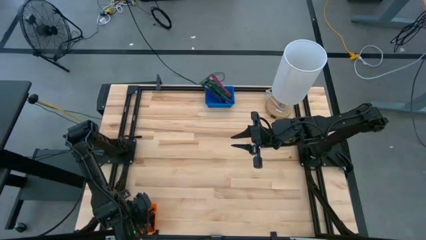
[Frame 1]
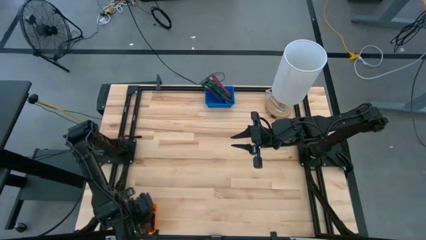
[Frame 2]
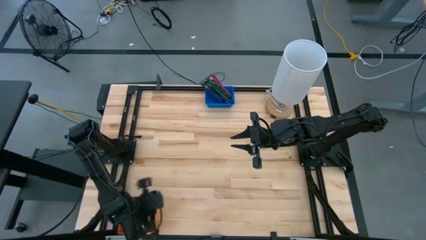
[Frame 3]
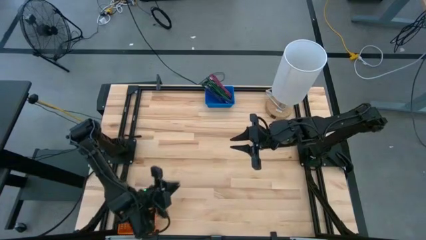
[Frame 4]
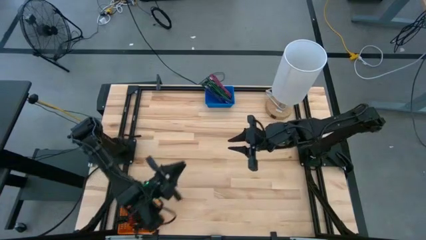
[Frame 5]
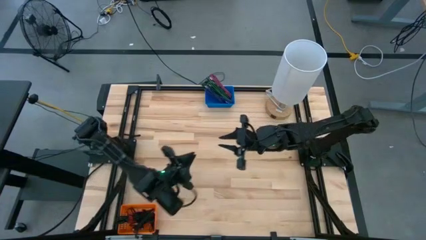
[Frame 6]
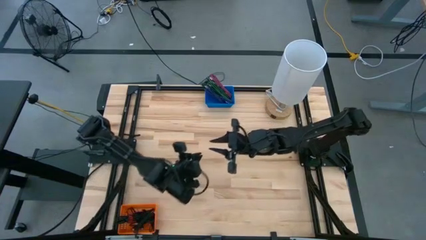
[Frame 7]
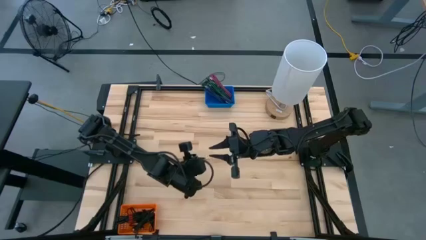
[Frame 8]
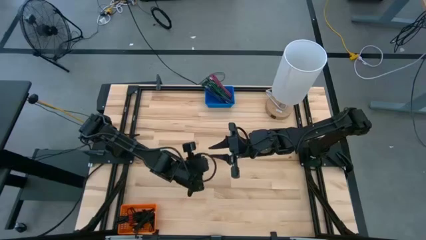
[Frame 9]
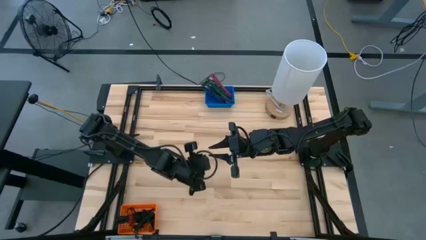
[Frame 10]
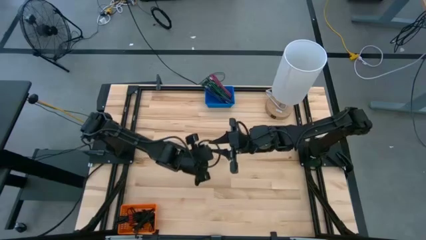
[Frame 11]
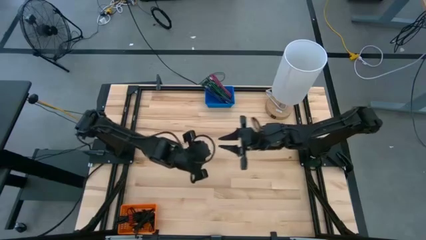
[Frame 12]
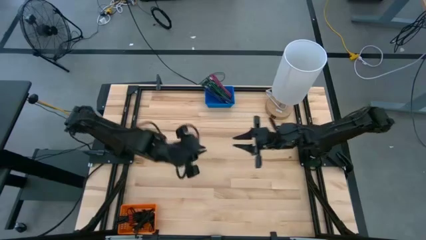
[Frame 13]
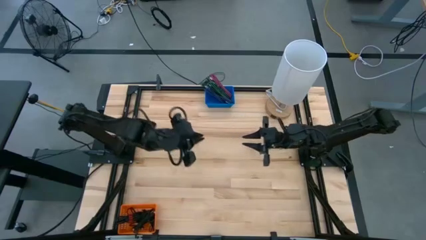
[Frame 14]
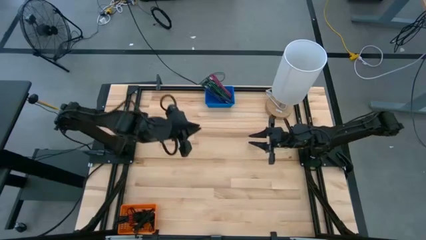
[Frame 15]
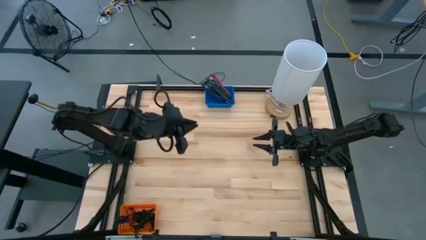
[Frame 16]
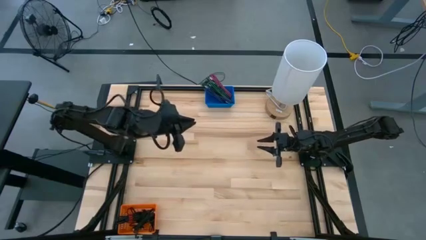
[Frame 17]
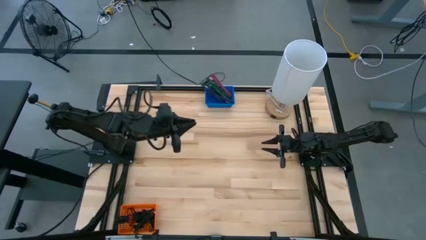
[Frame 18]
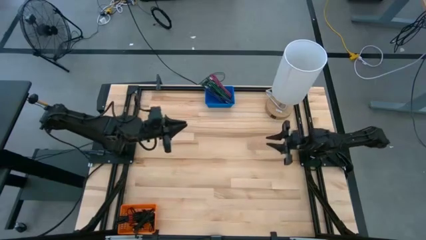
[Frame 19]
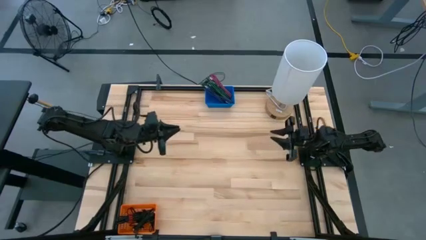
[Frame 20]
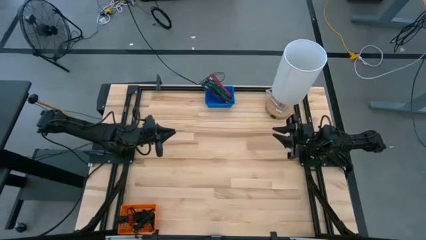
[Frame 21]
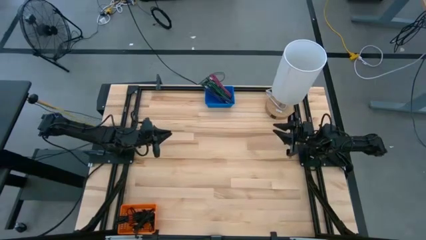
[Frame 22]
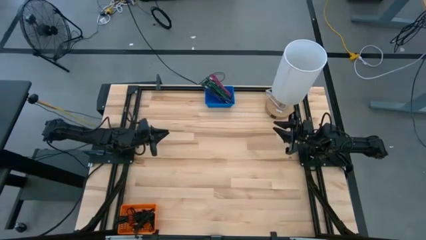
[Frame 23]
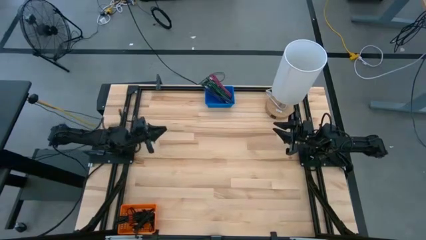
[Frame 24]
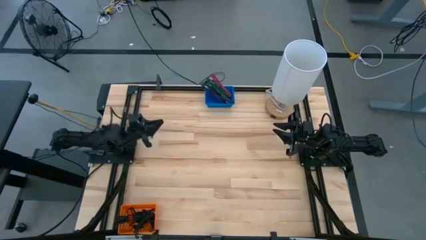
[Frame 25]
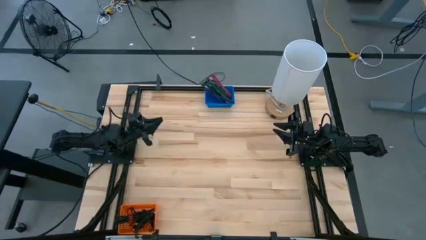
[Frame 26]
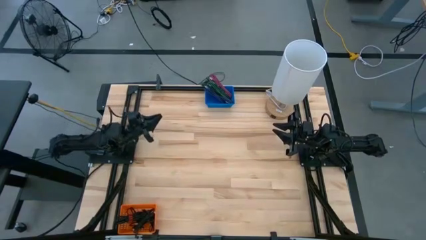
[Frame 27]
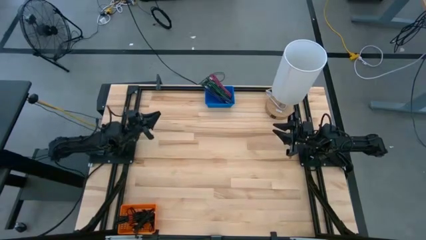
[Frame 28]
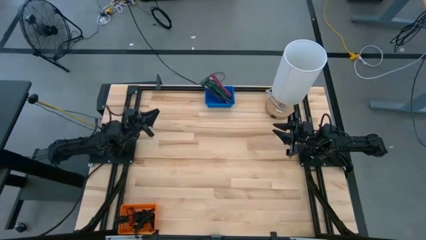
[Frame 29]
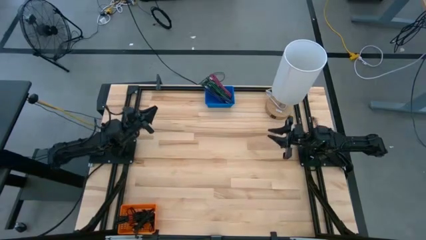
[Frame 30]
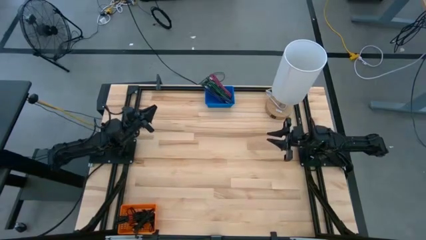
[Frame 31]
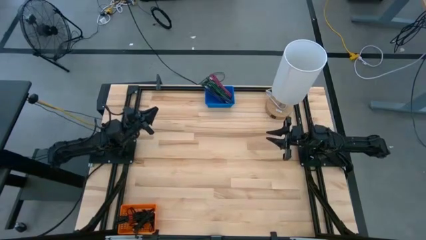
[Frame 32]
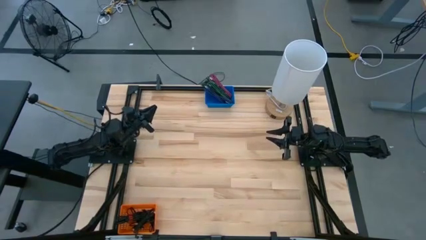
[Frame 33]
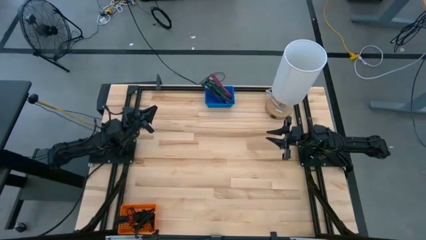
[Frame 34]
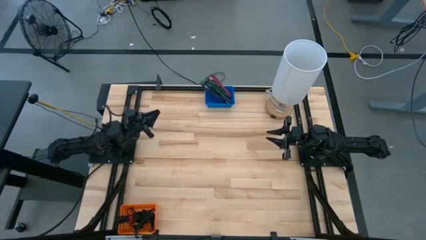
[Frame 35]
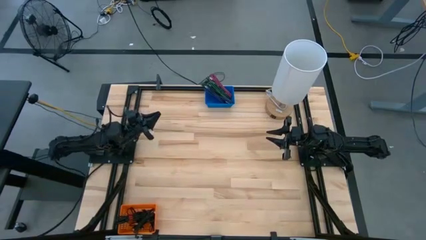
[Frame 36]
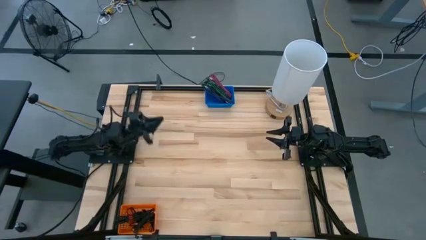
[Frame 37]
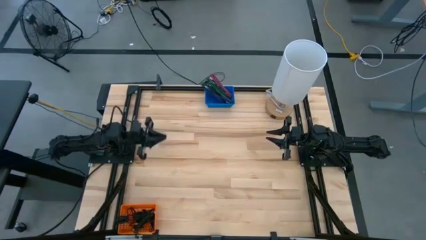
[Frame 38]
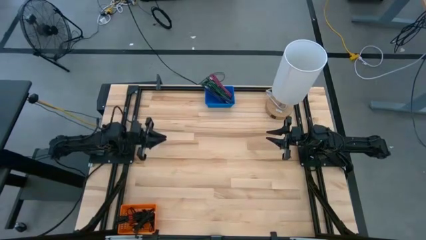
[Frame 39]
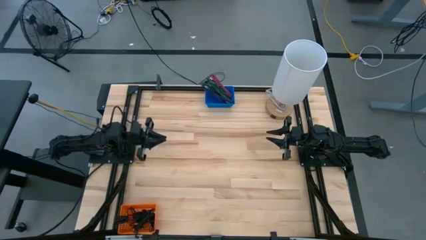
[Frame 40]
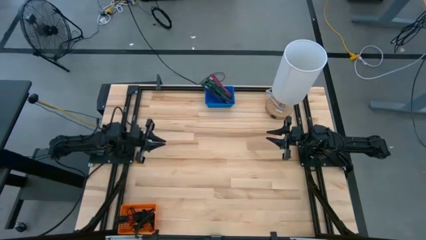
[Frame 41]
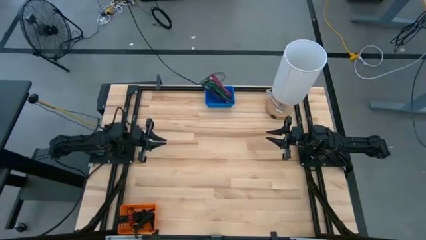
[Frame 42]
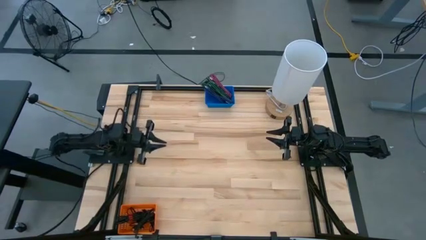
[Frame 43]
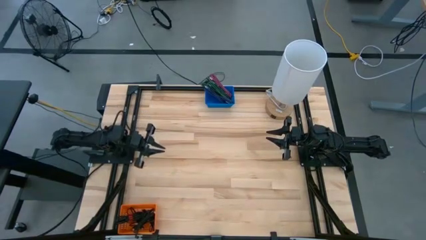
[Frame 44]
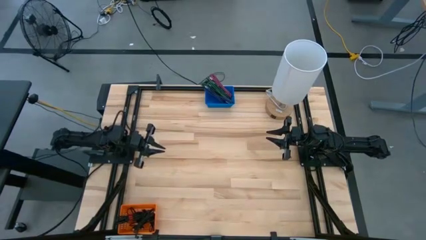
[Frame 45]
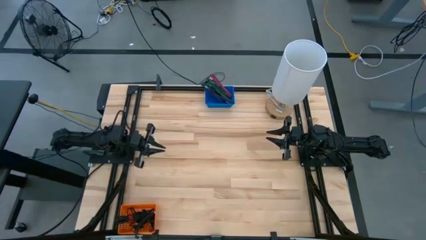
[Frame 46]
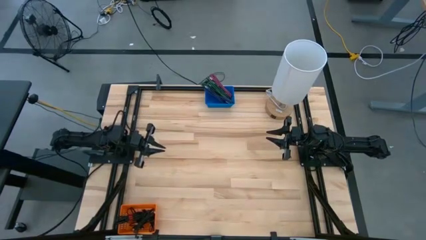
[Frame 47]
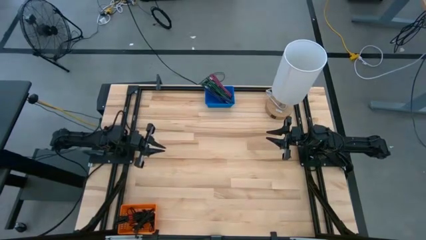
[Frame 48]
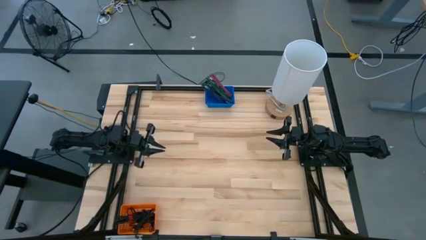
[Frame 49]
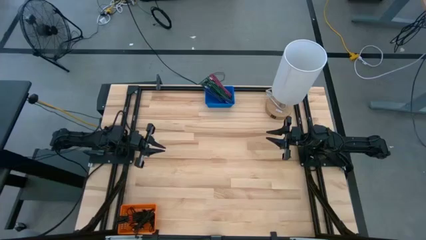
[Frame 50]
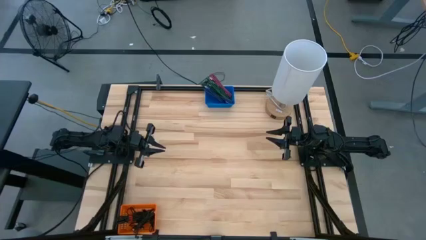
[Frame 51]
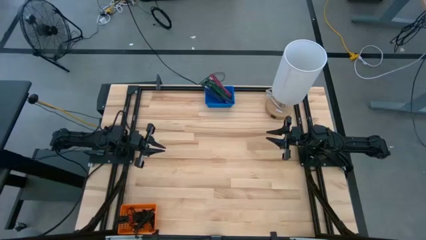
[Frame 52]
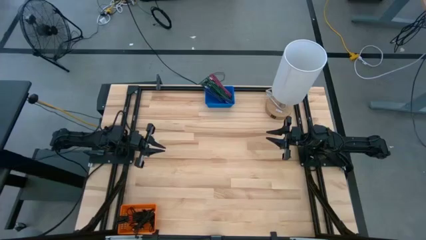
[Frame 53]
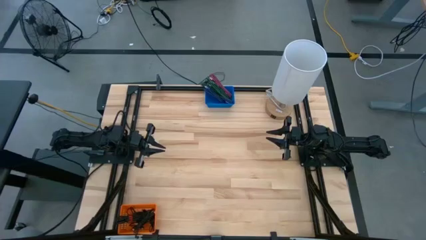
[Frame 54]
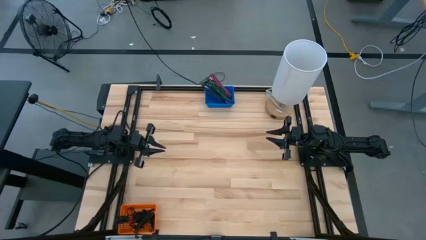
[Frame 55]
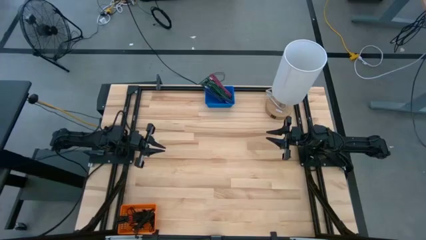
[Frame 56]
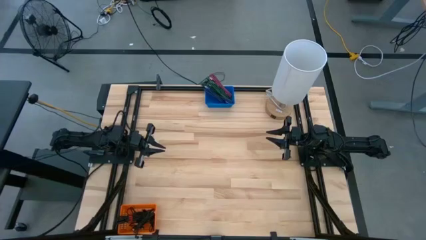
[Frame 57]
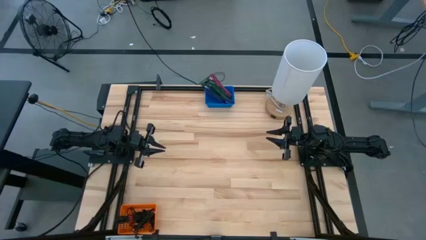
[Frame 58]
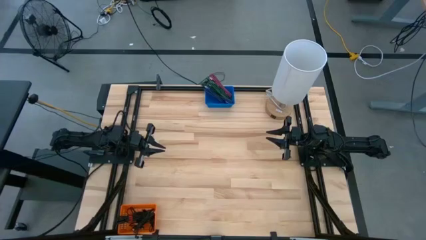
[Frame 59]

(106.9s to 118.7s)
Task: Pick & Place USB Port
Return to Home Position
